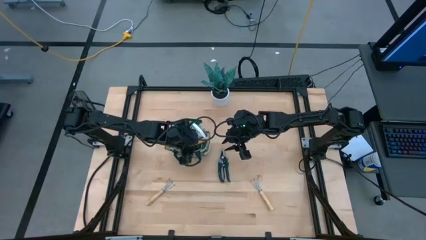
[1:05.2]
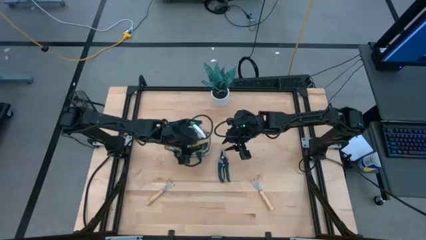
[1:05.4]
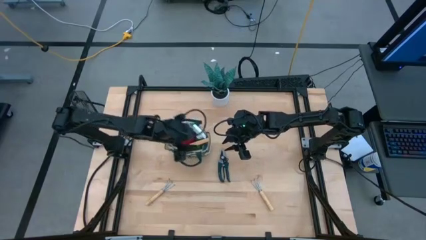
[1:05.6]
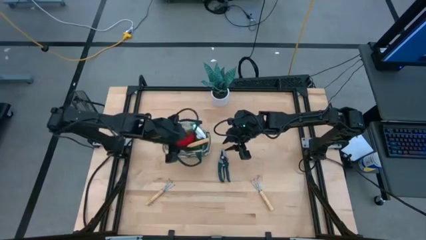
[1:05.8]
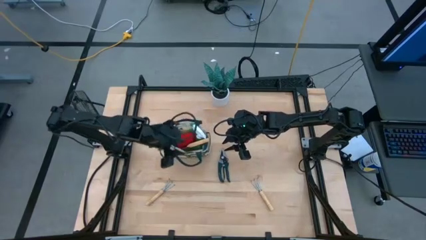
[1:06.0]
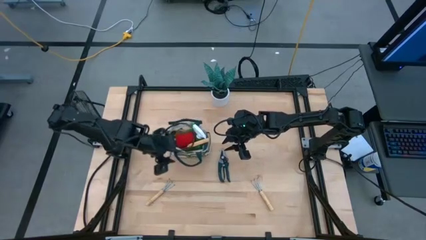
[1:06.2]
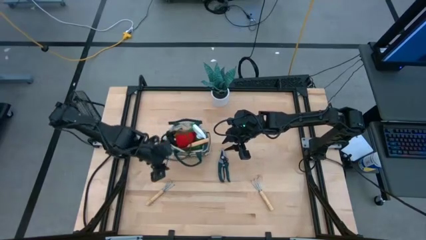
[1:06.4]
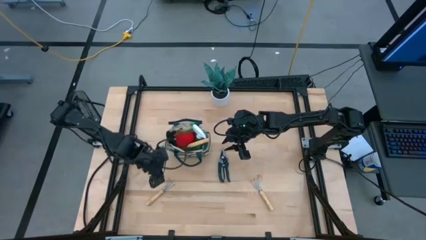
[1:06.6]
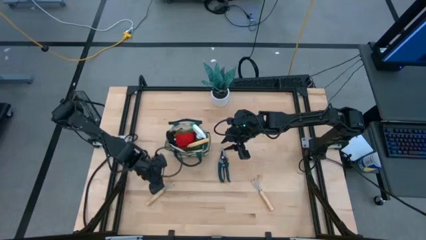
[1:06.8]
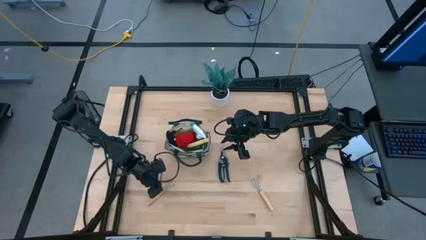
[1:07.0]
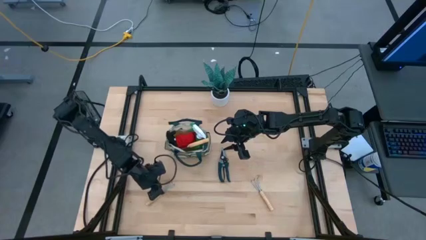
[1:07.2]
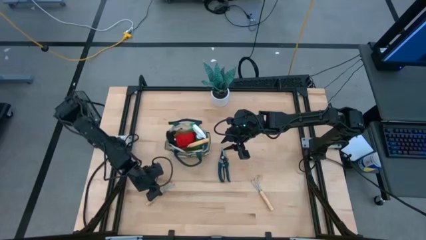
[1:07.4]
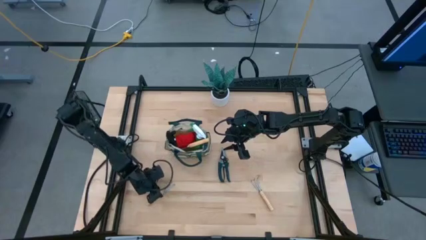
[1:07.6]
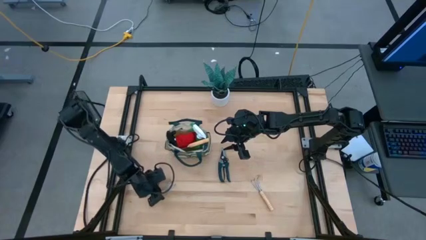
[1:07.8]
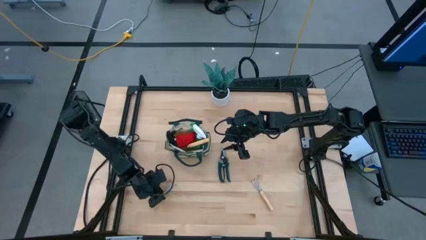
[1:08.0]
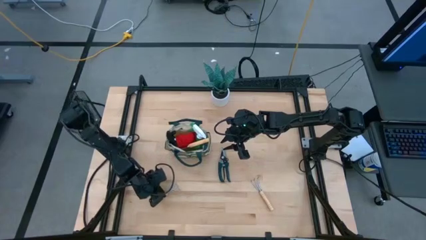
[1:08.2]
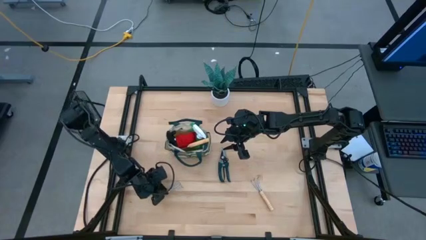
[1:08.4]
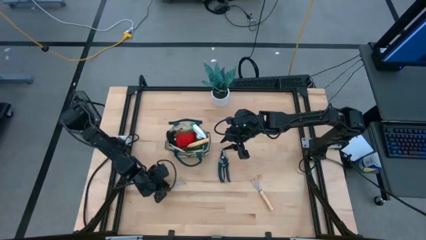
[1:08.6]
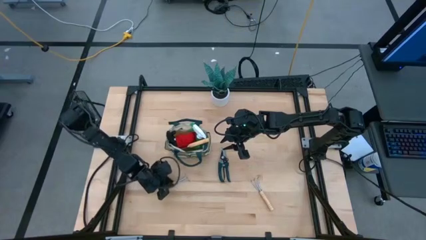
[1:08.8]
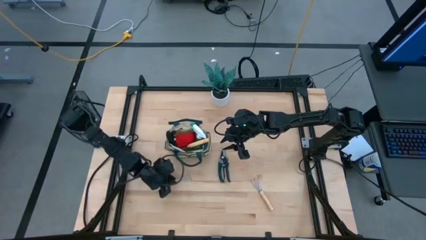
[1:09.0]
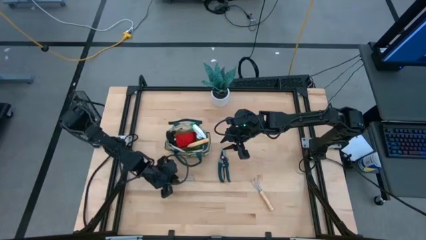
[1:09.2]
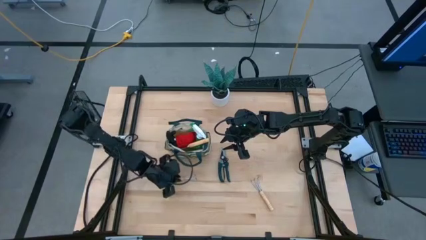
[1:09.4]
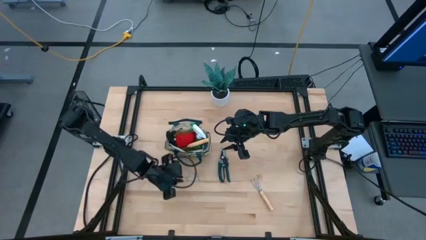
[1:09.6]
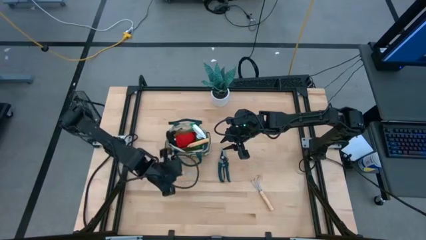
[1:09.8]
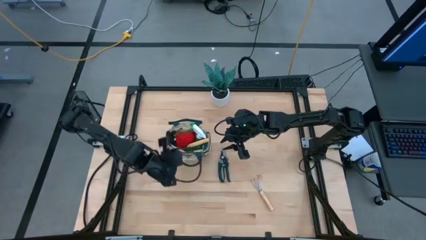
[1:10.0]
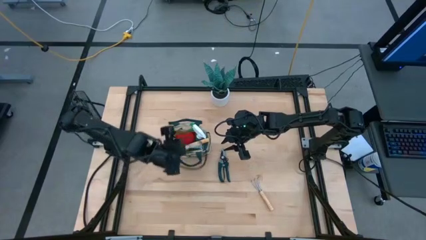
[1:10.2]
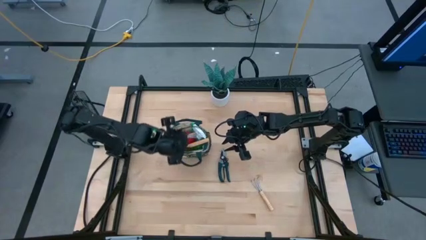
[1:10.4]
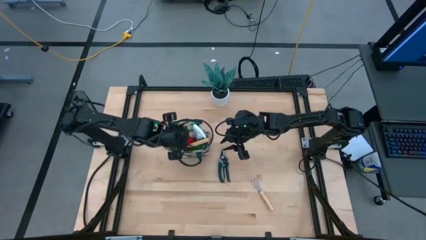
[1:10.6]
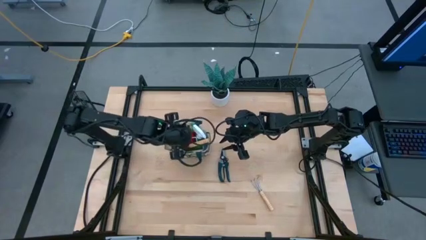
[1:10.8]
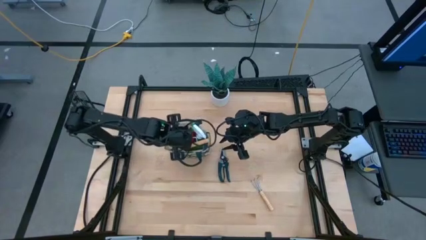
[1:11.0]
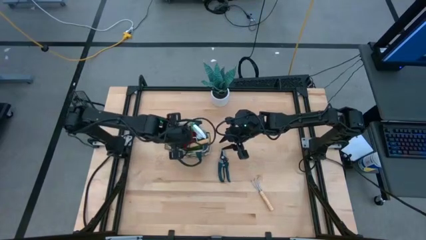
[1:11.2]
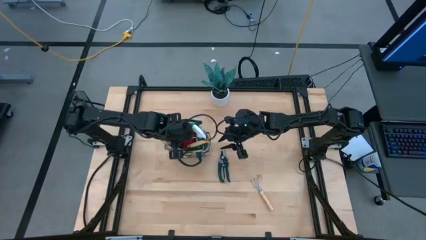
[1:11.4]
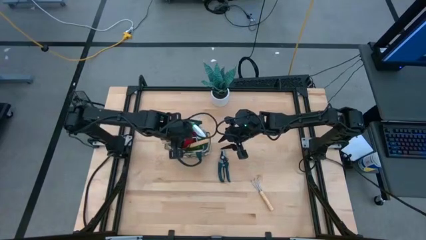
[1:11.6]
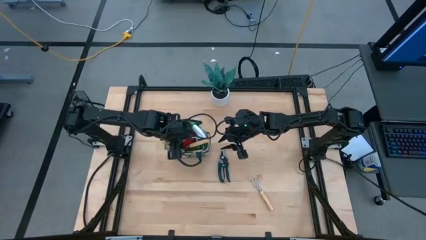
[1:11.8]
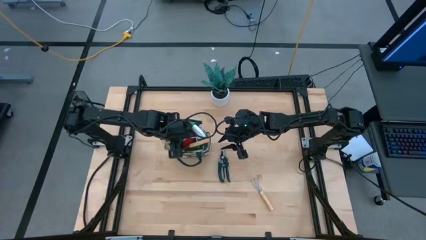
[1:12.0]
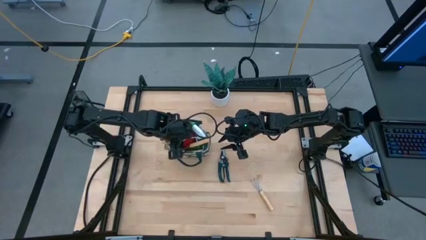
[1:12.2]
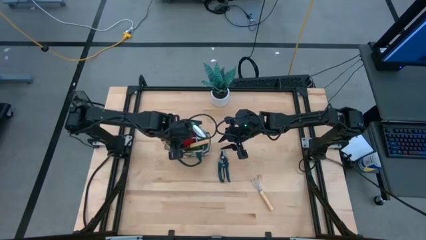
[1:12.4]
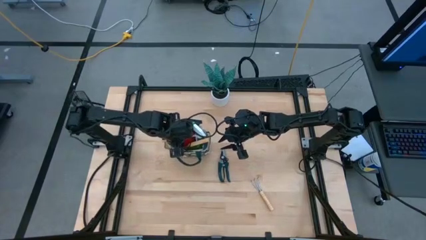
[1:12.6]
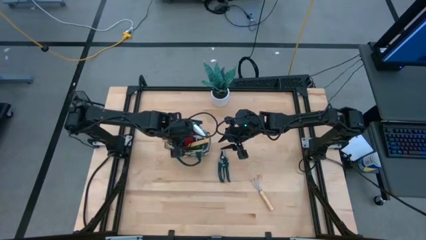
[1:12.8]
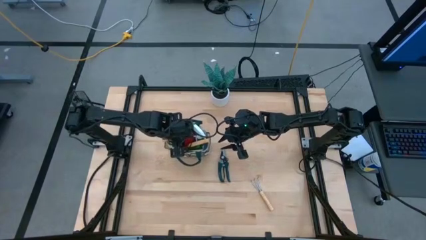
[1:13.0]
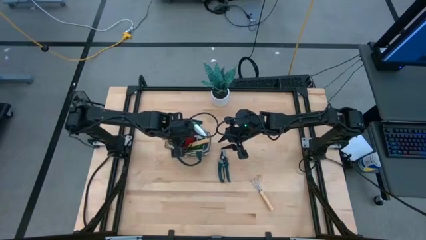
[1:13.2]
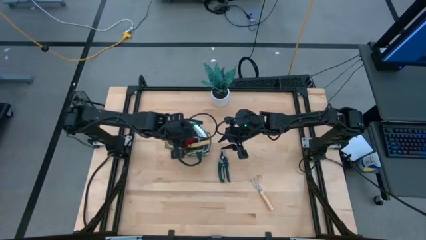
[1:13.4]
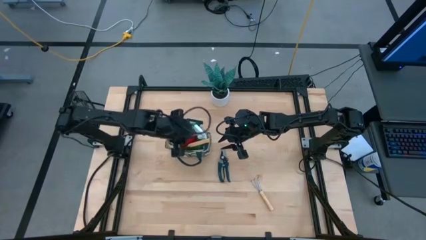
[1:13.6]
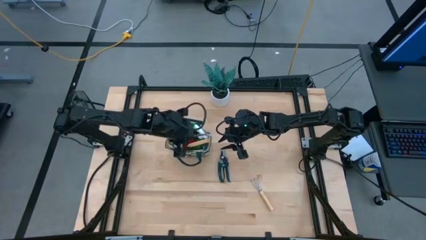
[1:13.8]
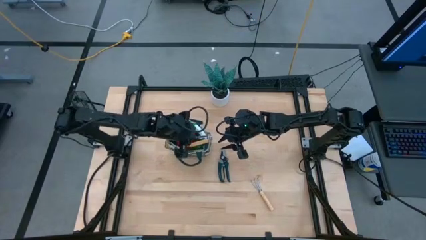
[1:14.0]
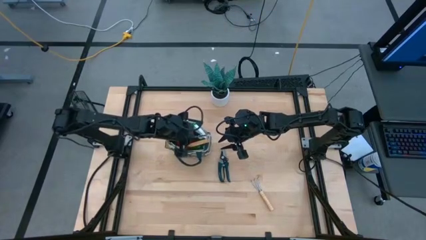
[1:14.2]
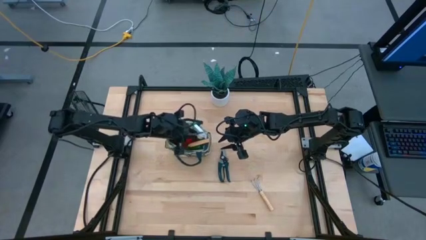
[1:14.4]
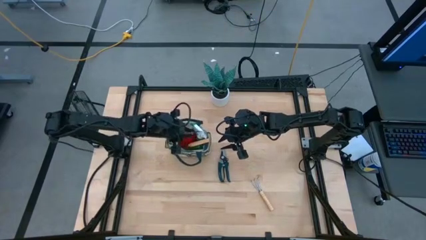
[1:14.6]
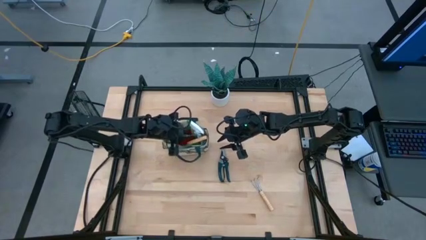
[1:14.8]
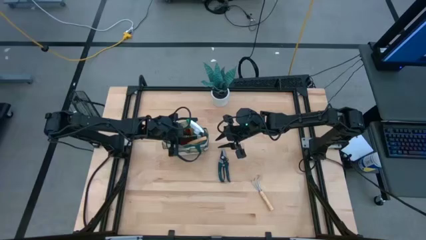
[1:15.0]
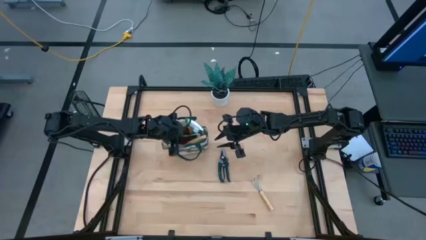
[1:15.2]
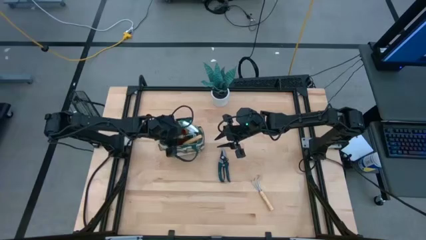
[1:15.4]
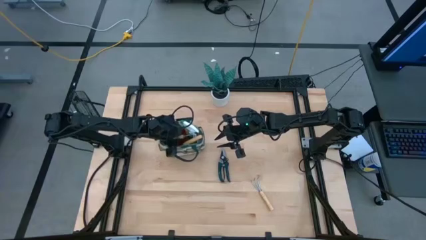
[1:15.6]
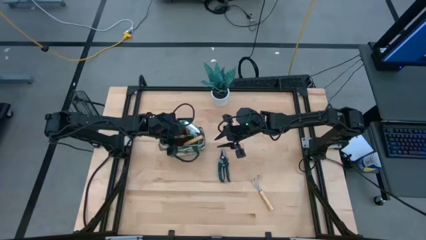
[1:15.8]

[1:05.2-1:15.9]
Task: Pick & Place Garden tools in Gardening bag
Put the left brown hand rake into the brown gardening bag
